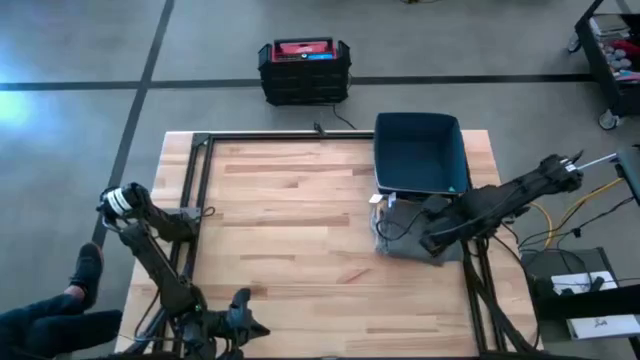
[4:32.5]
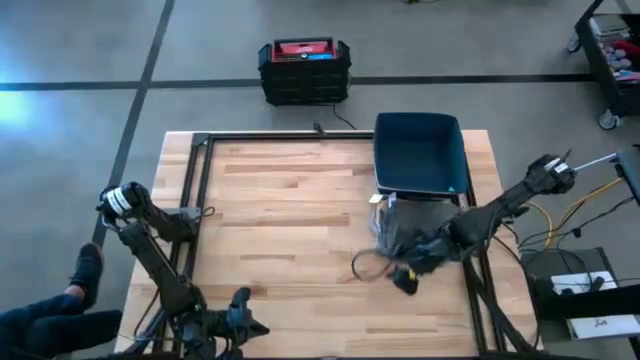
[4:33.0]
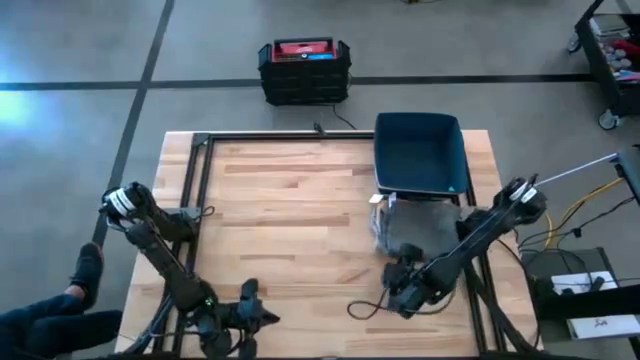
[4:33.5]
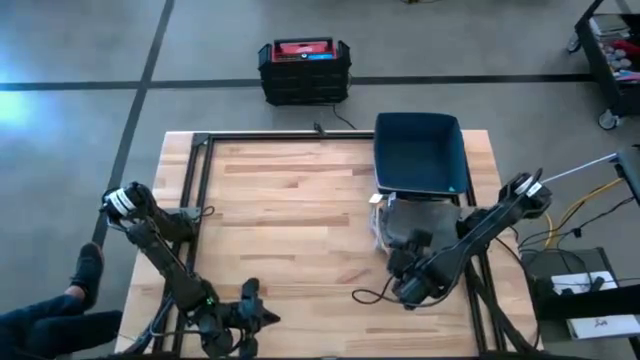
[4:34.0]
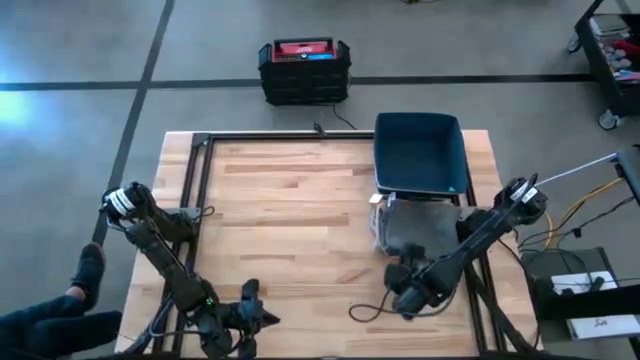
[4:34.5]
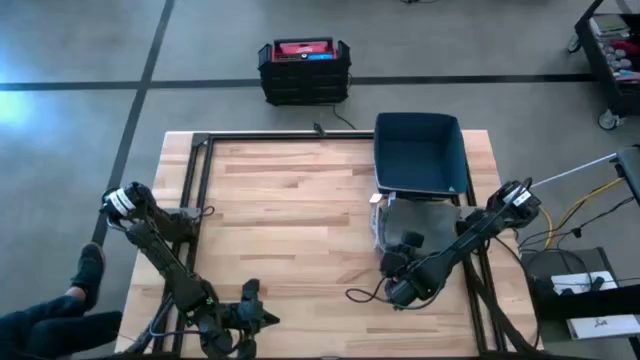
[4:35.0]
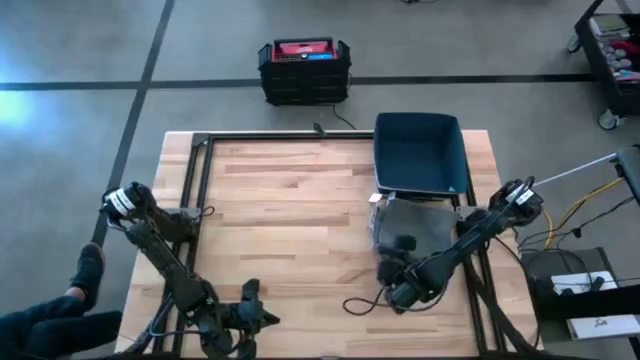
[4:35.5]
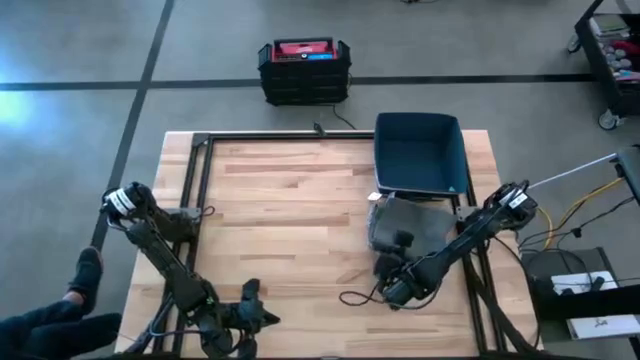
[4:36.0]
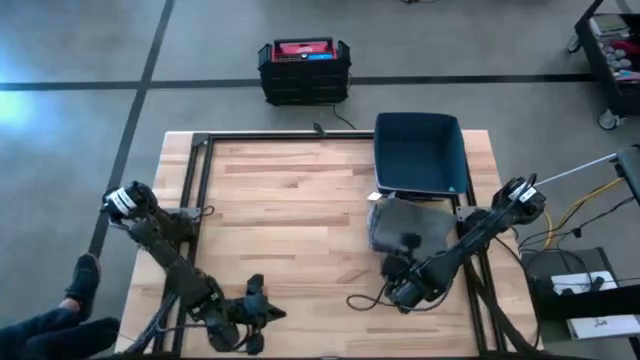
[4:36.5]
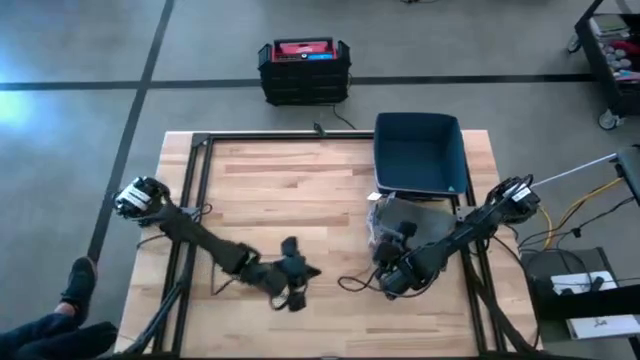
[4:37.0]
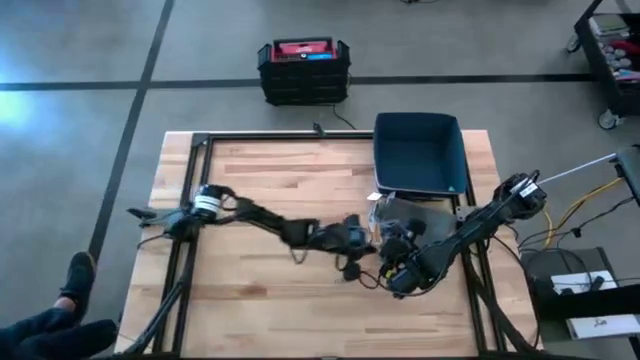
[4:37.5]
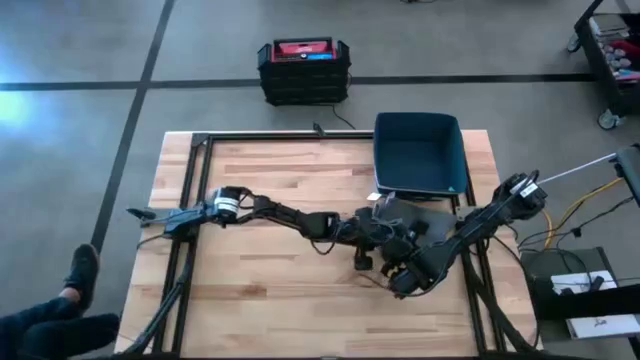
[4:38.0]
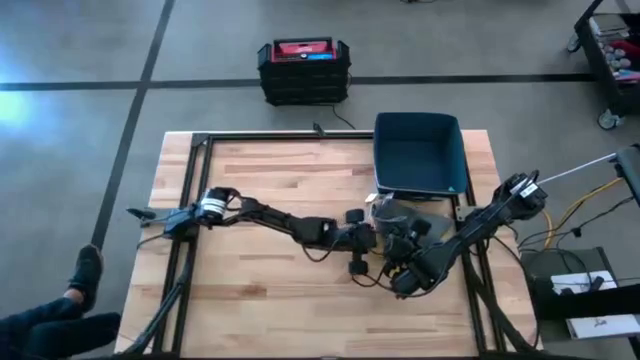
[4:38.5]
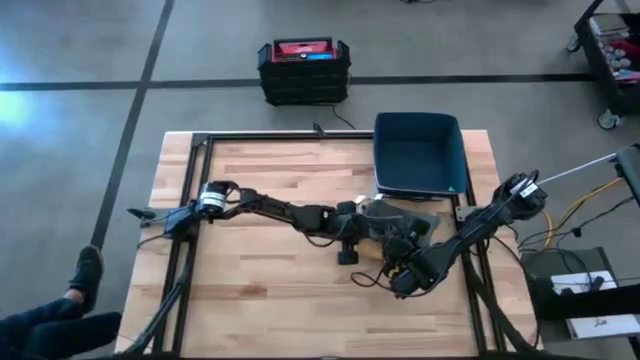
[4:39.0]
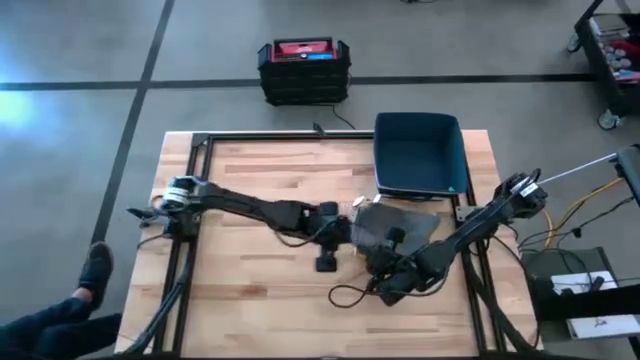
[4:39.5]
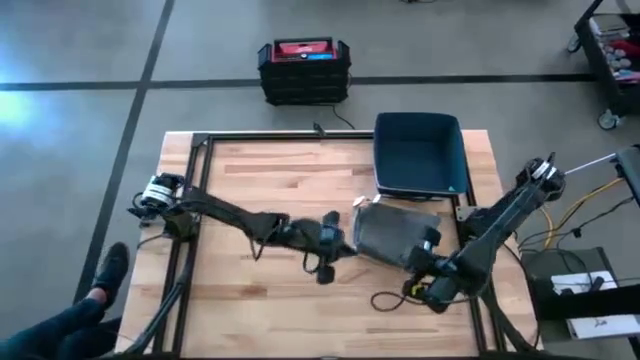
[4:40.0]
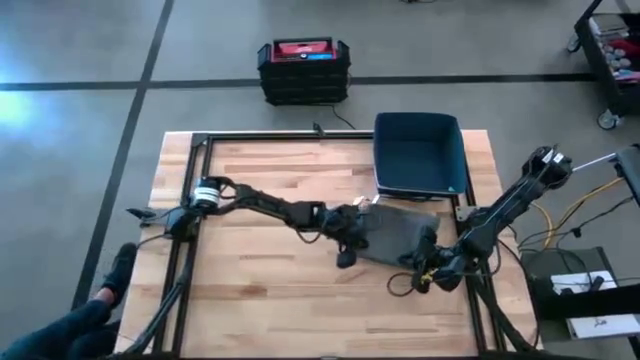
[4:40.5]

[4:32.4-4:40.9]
Task: Fold towel
Adjust the stacked kitchen towels

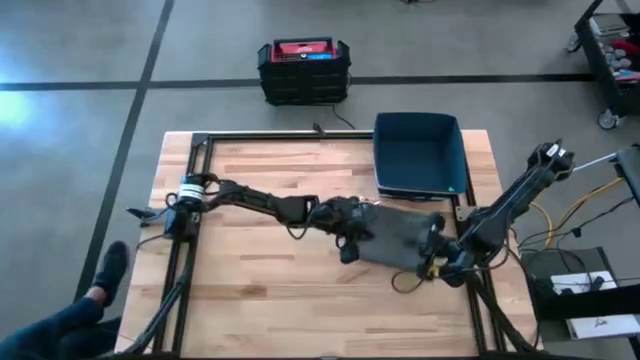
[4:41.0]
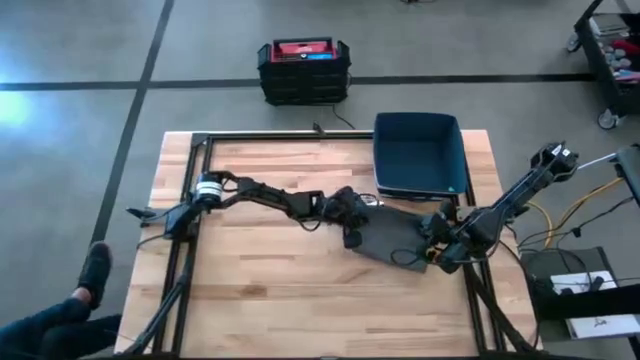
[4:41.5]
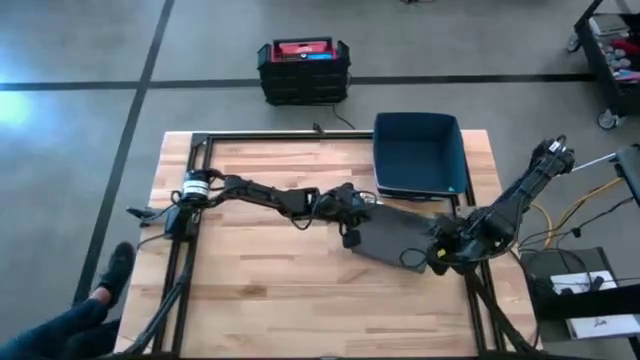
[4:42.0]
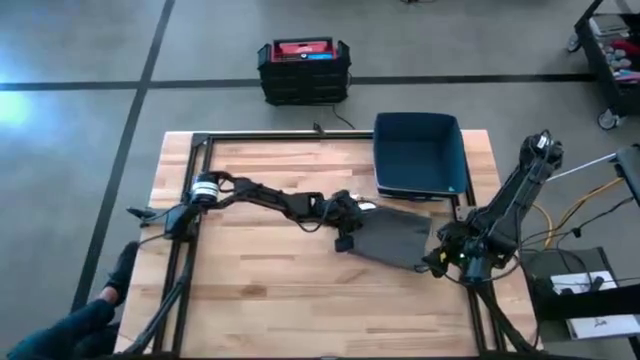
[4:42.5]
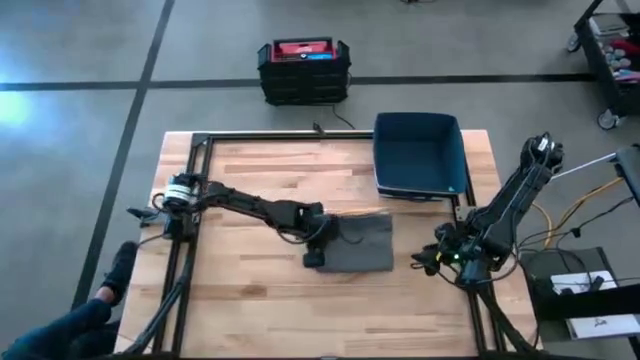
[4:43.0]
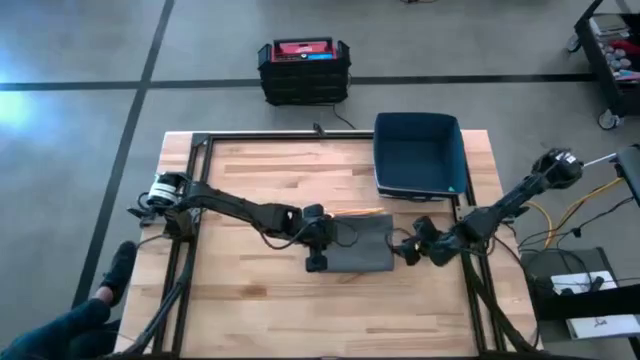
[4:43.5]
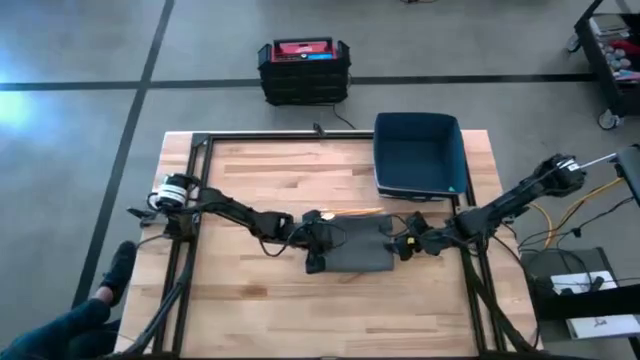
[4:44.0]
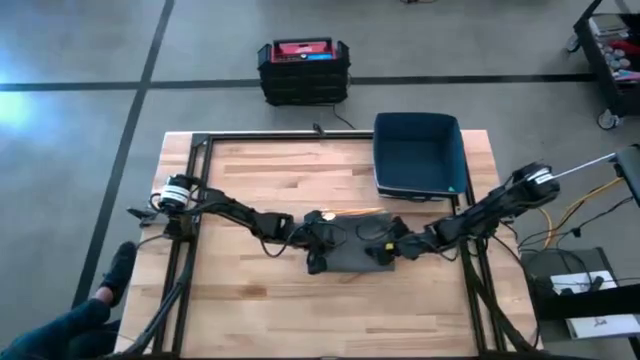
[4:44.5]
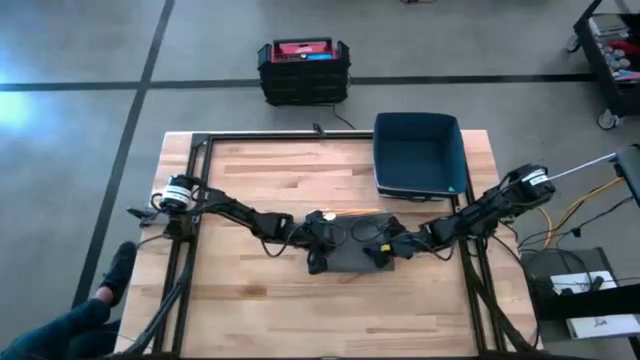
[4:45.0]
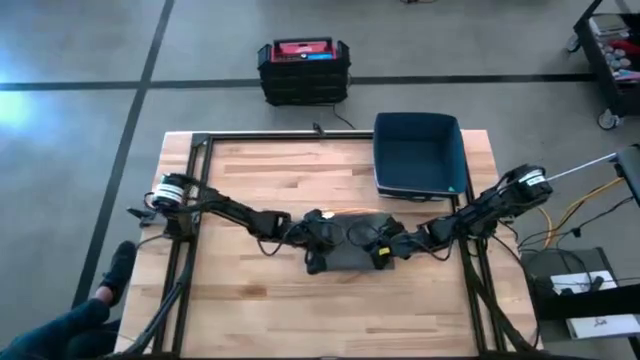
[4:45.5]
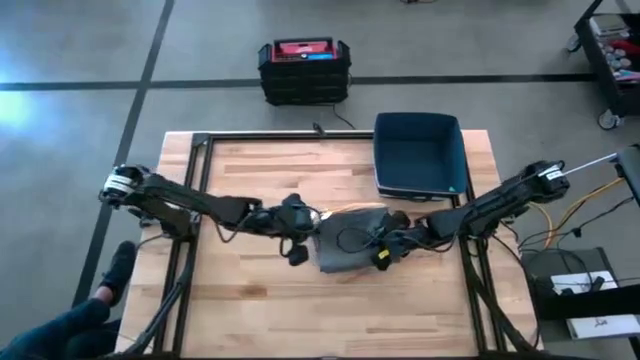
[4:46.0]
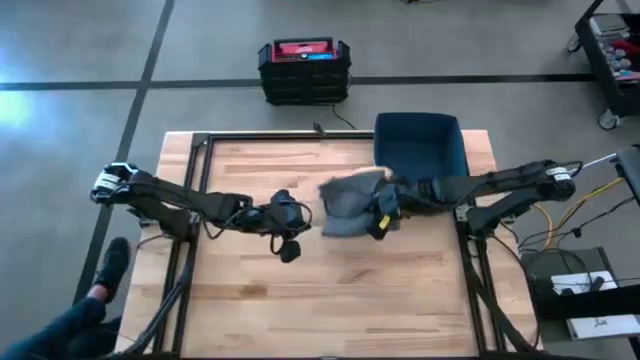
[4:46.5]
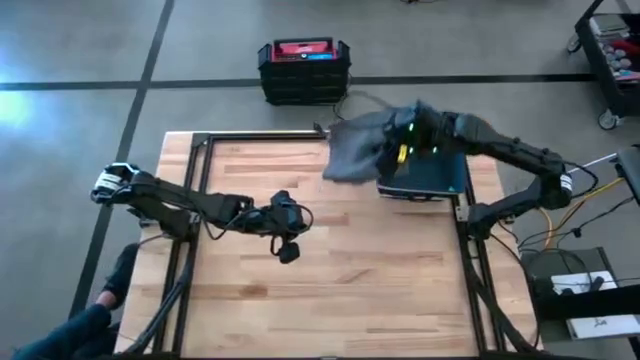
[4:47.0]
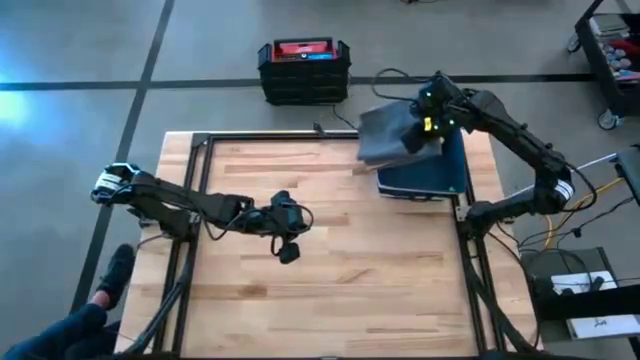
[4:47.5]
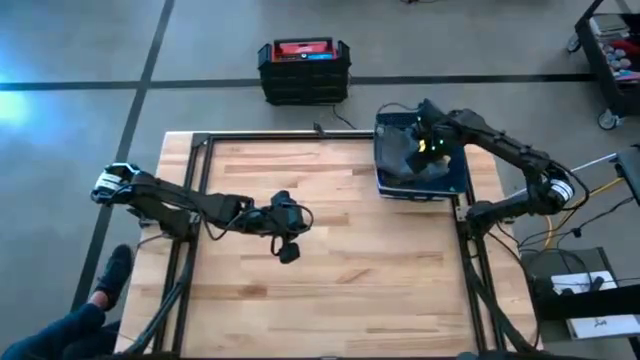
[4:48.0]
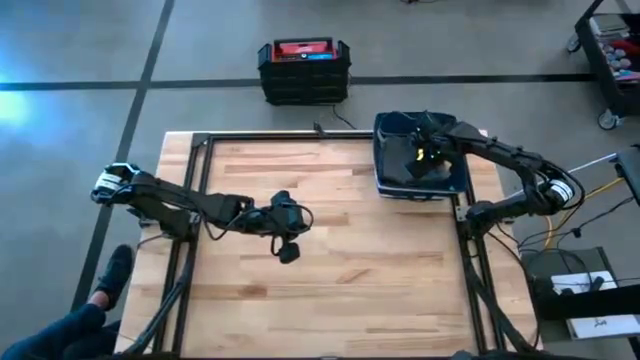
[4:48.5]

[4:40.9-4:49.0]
Put the stacked kitchen towels into the blue laundry bin

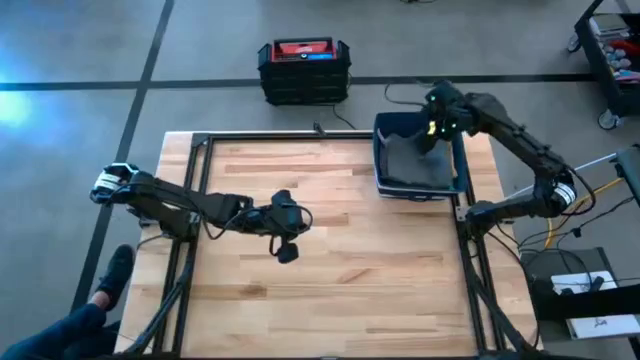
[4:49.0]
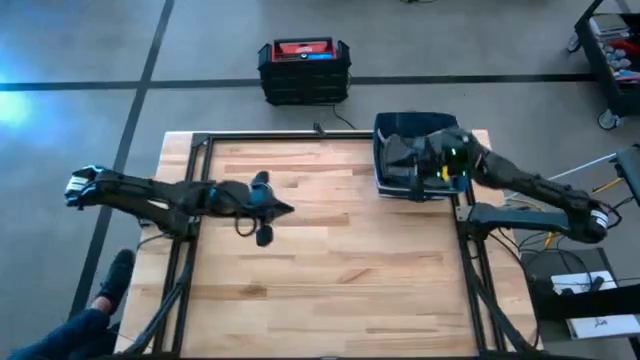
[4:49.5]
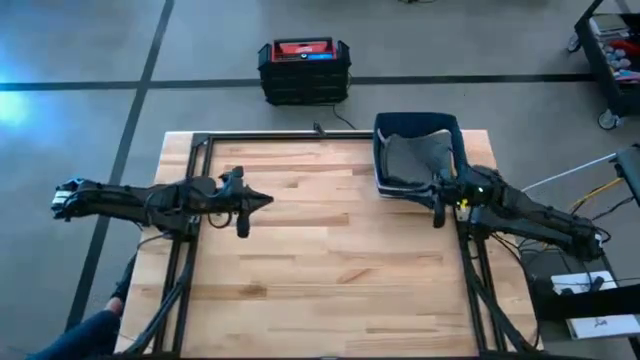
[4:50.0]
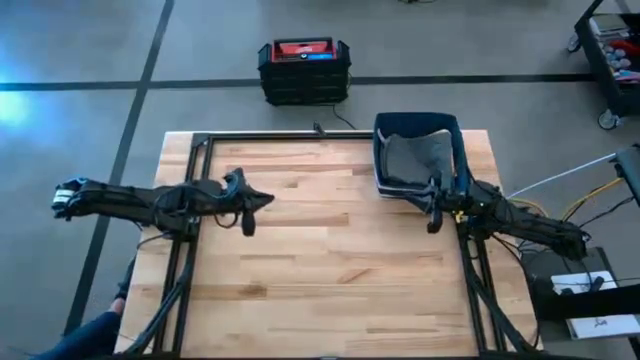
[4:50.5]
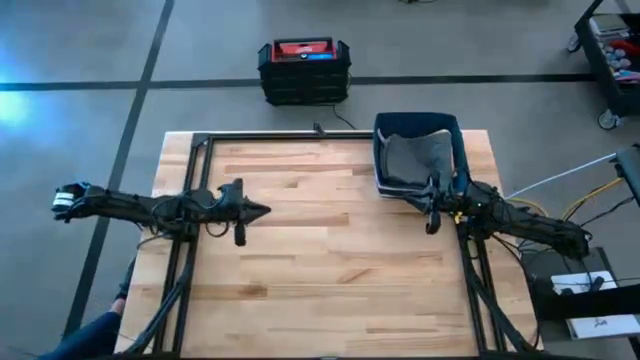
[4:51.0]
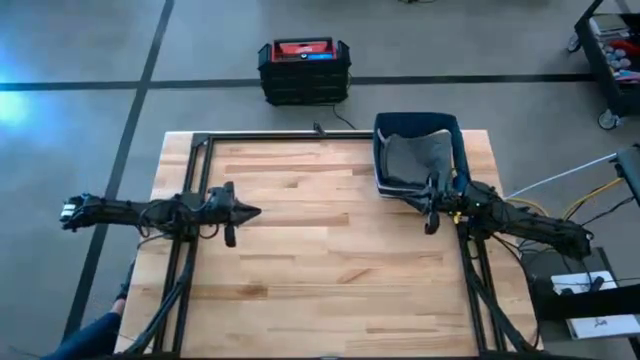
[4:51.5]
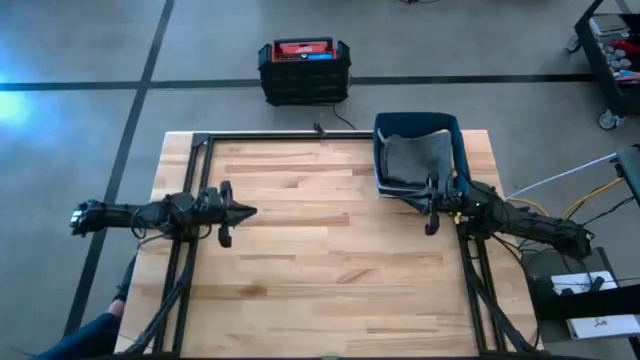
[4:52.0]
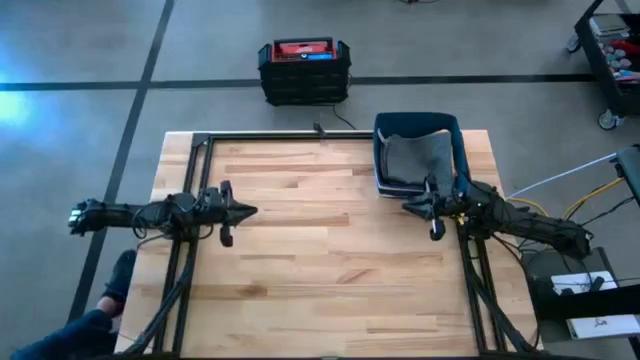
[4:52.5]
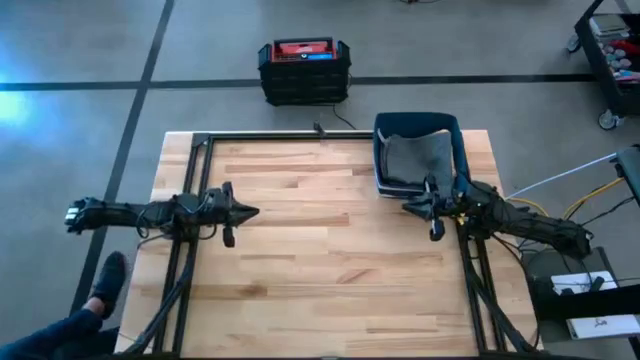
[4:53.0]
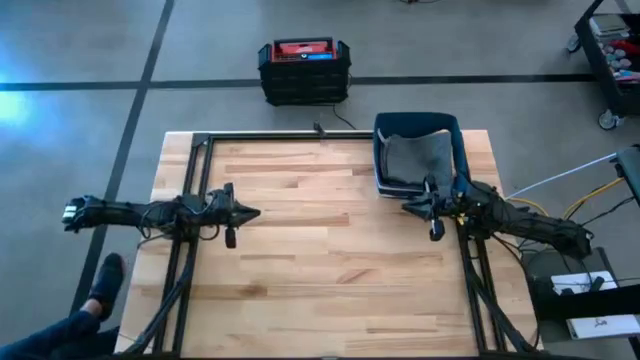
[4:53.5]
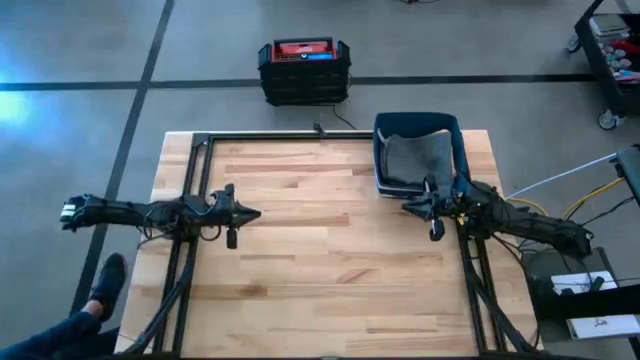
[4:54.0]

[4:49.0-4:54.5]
Return to Home Position
